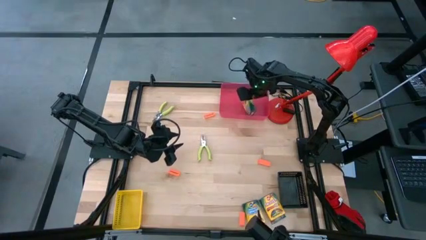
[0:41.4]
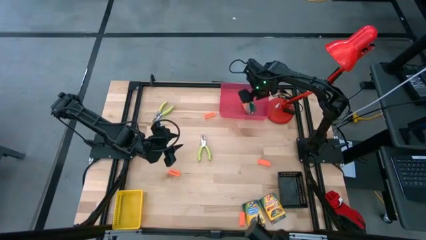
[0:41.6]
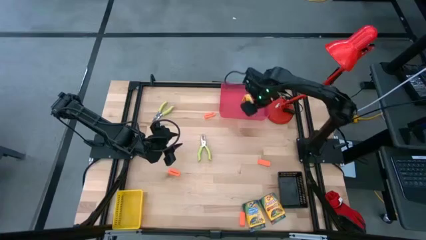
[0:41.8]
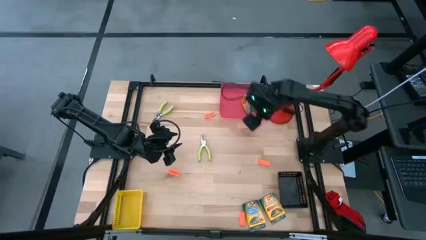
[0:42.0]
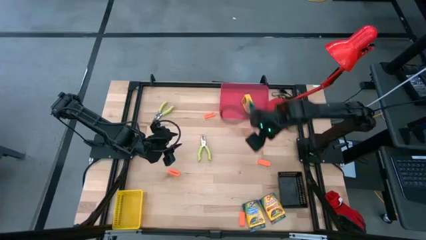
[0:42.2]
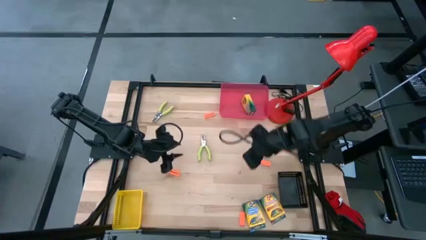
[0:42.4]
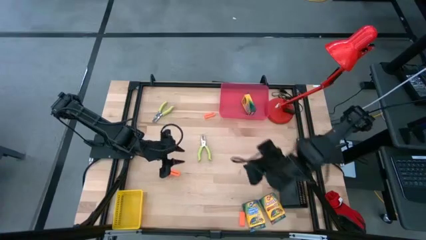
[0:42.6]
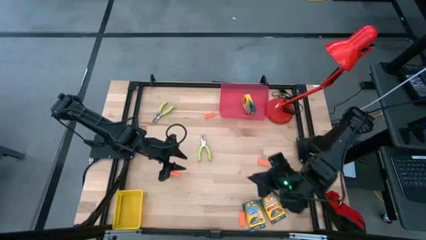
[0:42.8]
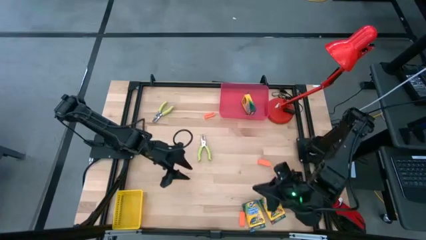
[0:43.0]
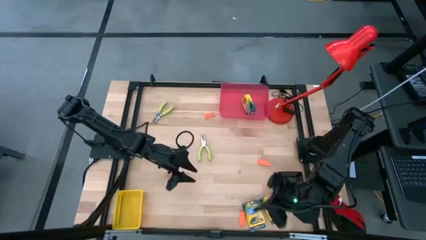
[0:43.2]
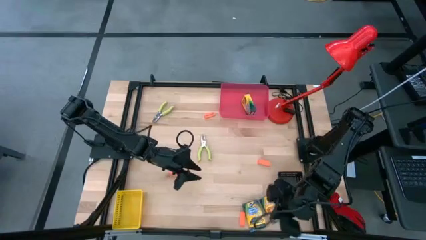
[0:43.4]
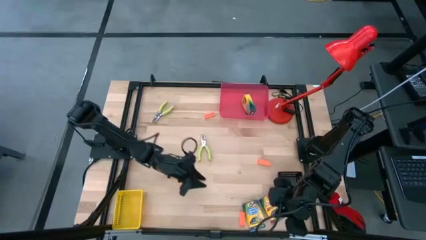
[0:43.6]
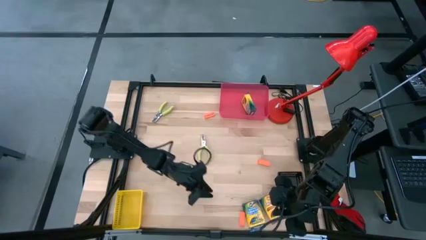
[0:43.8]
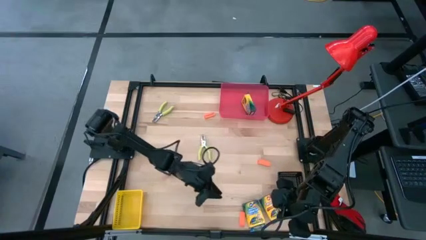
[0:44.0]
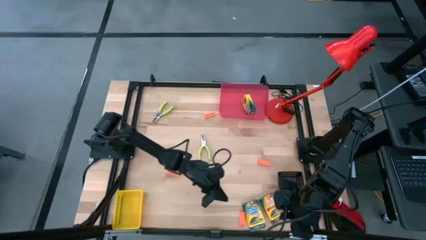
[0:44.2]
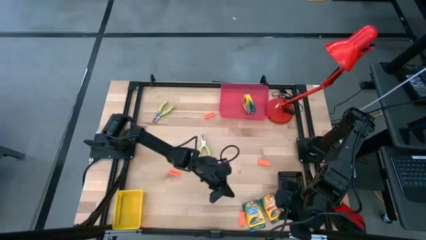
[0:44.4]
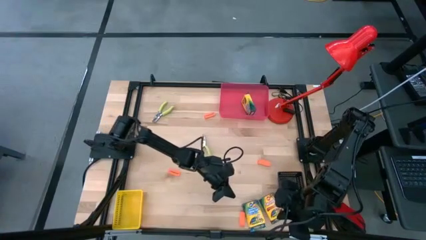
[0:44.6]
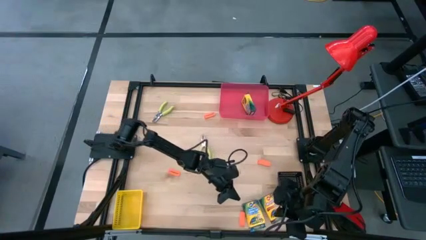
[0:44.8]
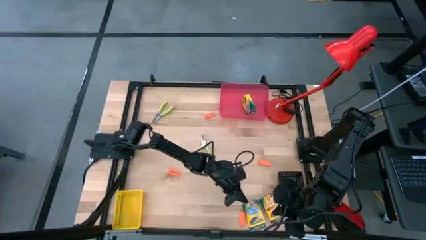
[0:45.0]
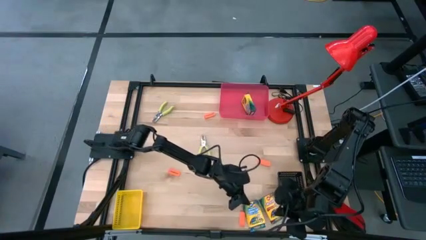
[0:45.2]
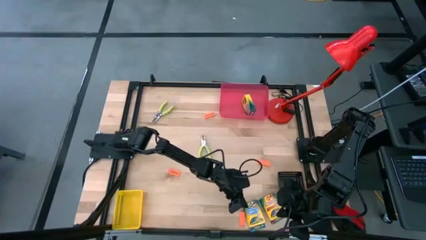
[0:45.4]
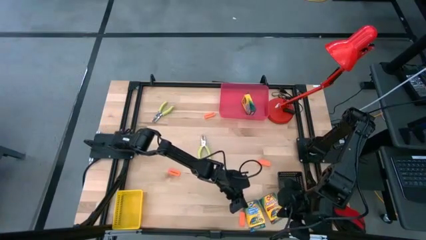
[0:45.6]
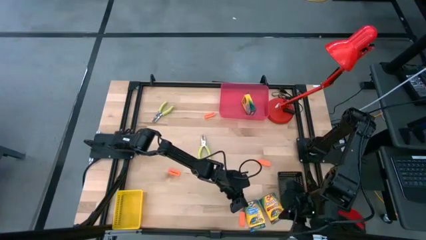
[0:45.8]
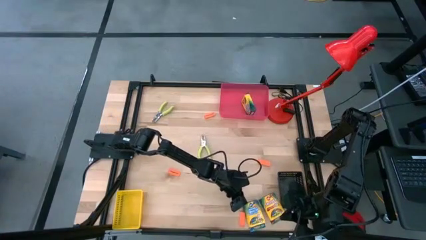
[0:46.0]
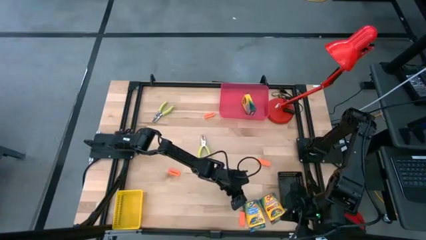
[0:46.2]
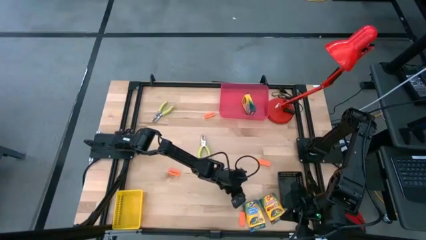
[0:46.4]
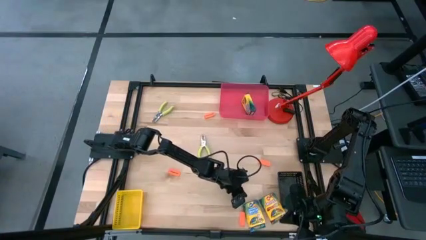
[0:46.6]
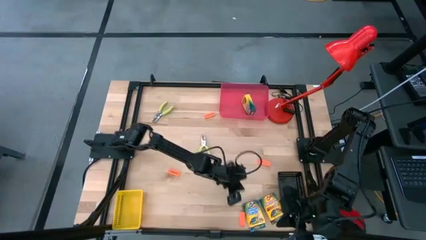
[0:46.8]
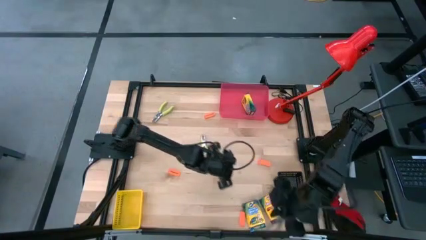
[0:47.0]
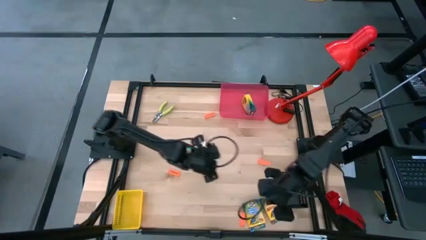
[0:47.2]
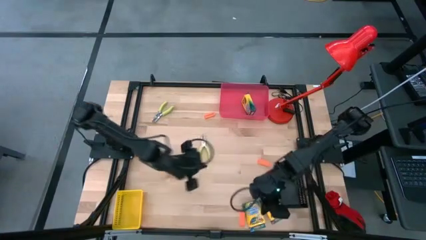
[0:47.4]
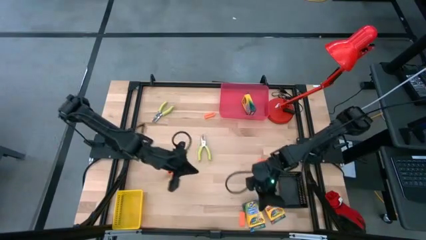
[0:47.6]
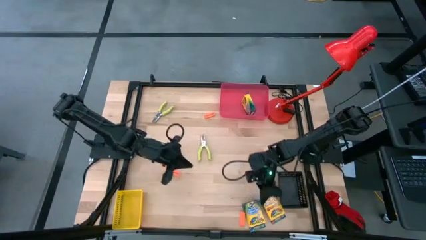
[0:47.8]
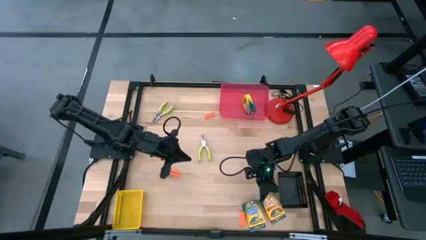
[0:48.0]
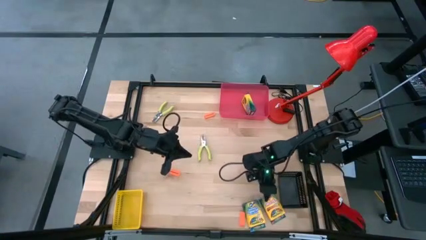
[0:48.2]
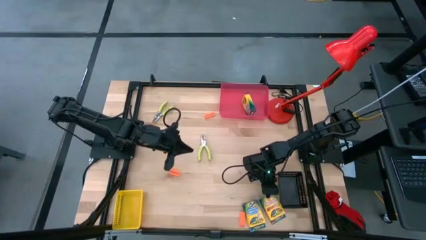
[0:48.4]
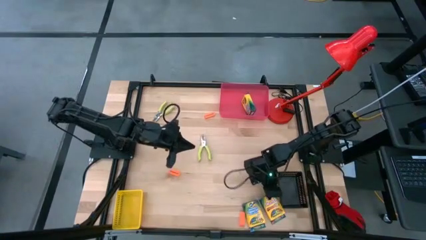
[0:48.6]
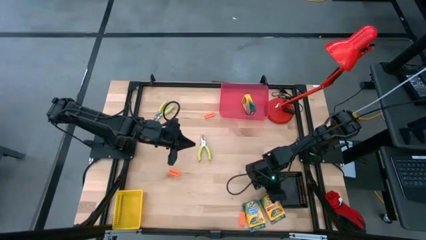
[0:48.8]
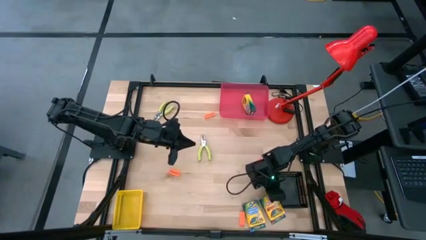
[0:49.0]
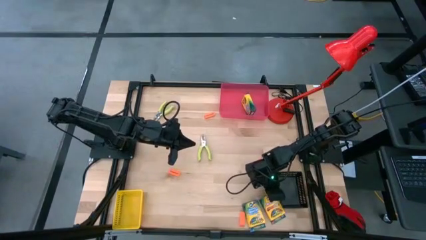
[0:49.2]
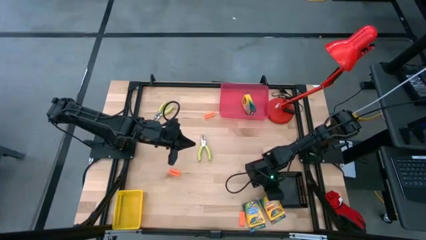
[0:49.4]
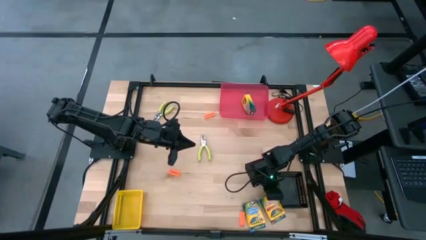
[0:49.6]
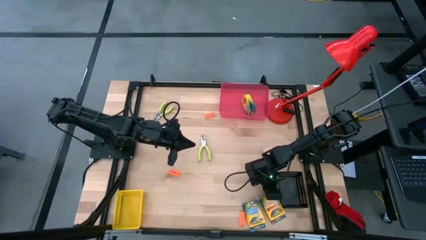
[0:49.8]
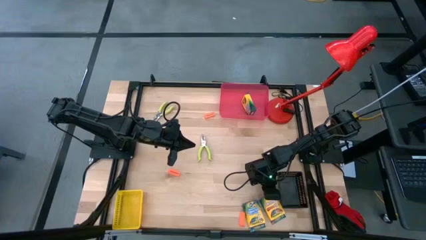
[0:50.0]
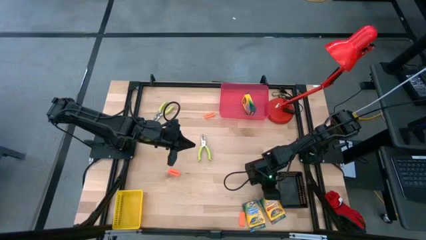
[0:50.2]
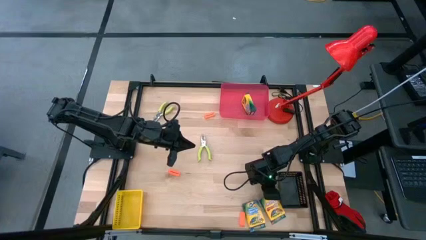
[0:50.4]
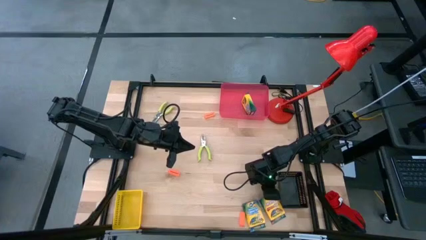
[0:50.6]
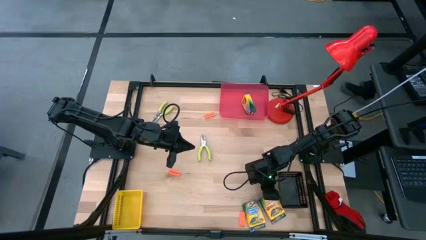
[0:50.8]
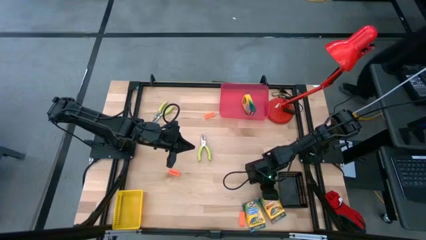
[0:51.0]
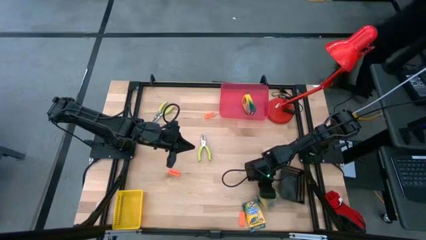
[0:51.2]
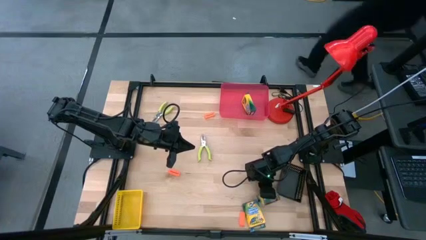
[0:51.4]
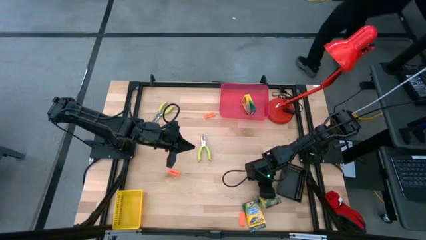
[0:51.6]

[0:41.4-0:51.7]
Task: Pick & Place School Supplies
Put the yellow crayon box into the red bin

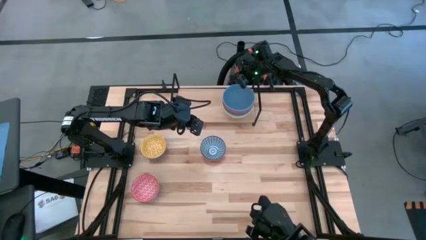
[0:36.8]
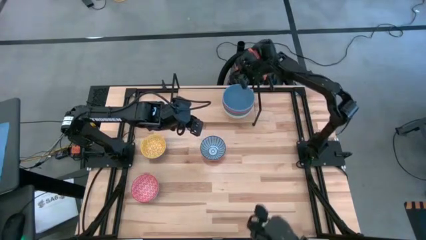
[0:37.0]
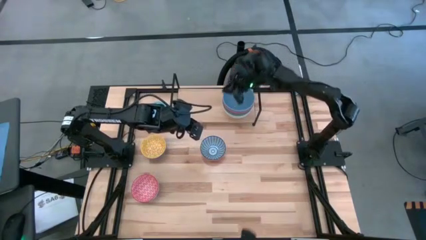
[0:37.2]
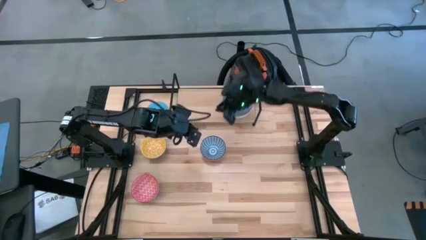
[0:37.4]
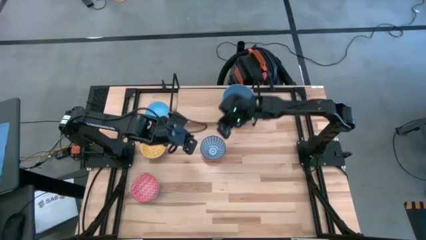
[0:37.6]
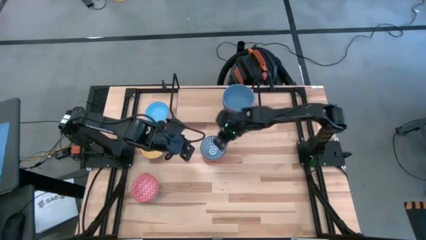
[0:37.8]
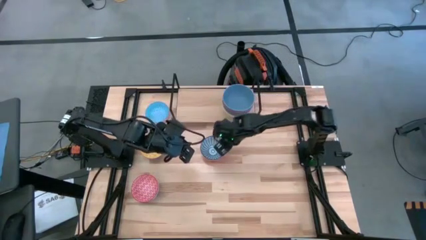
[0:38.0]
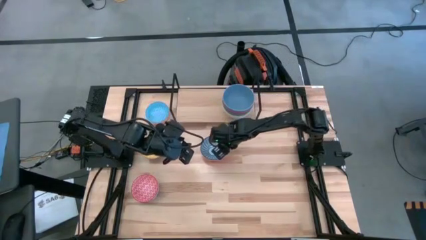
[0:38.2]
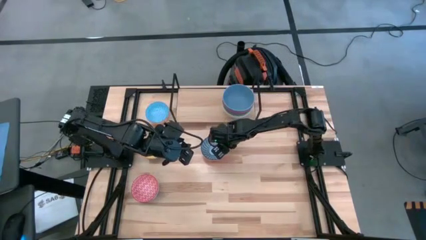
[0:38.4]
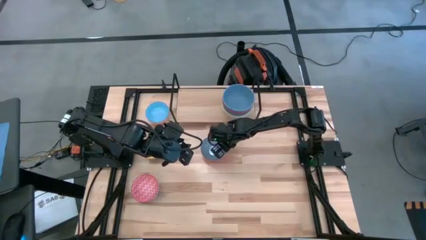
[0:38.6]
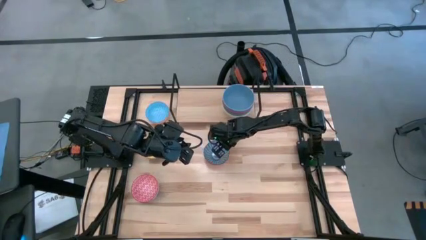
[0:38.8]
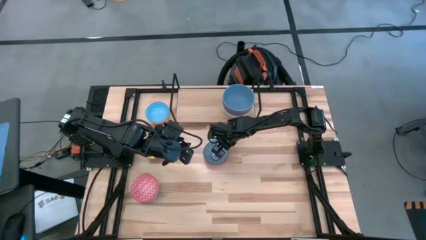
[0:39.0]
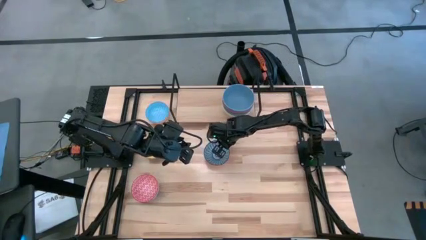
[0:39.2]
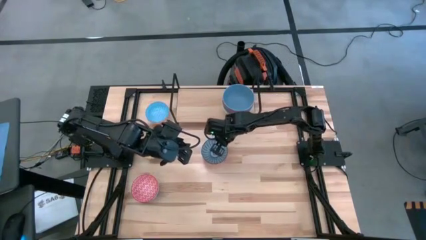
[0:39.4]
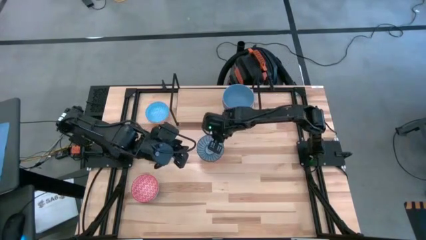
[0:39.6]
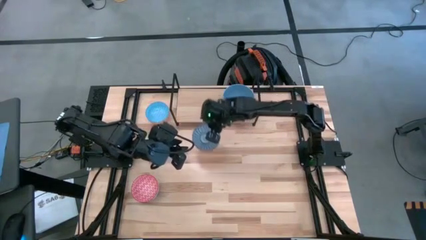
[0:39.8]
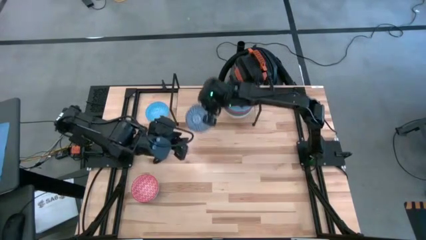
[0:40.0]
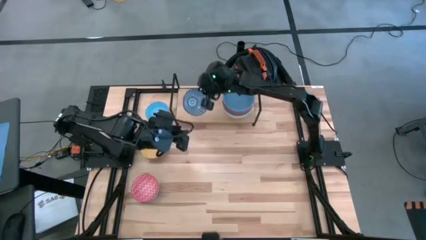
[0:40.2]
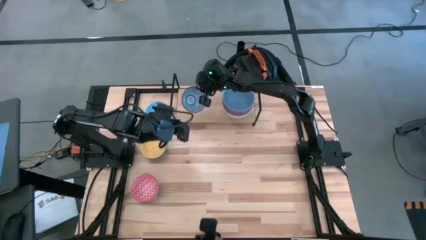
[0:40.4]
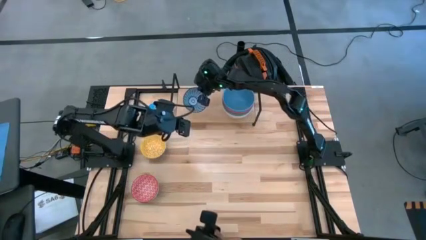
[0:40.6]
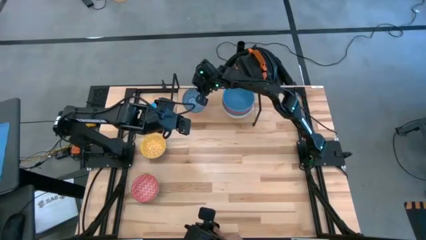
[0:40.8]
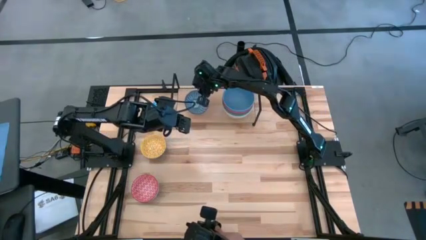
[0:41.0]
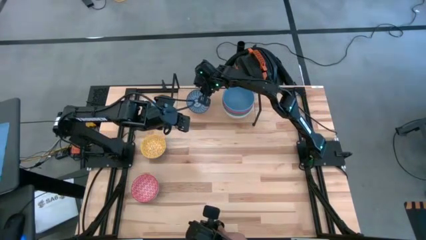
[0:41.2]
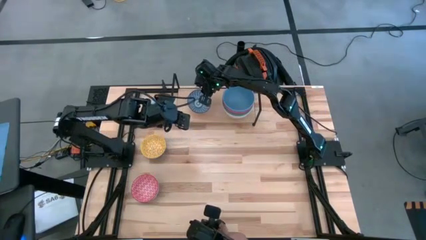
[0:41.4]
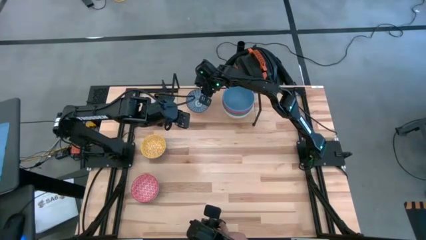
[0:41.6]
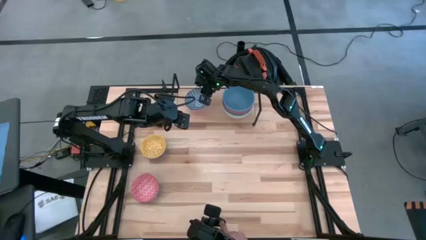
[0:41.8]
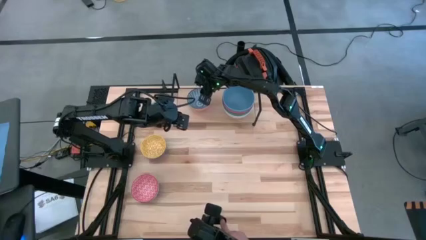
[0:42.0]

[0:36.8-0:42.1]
Task: Place and stack bowls onto a shelf
Put the small dark blue bowl on the shelf
